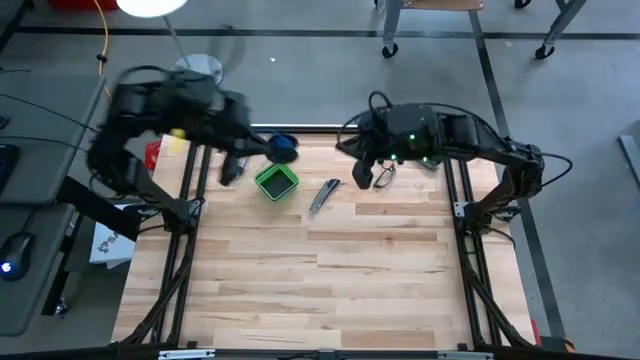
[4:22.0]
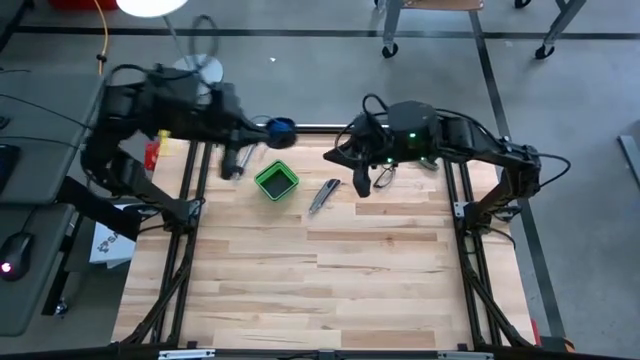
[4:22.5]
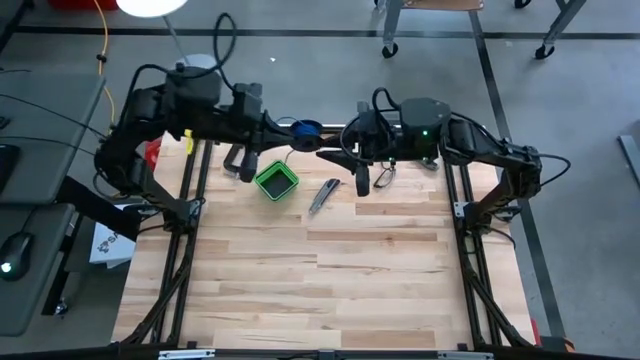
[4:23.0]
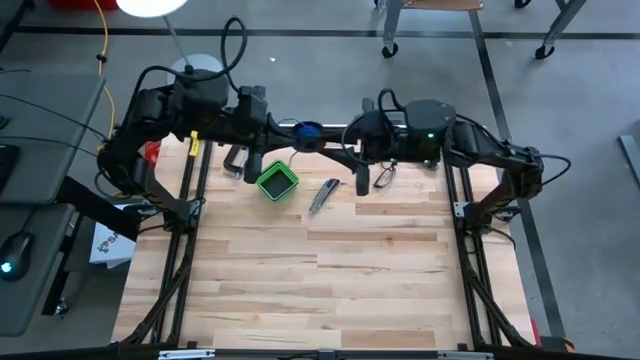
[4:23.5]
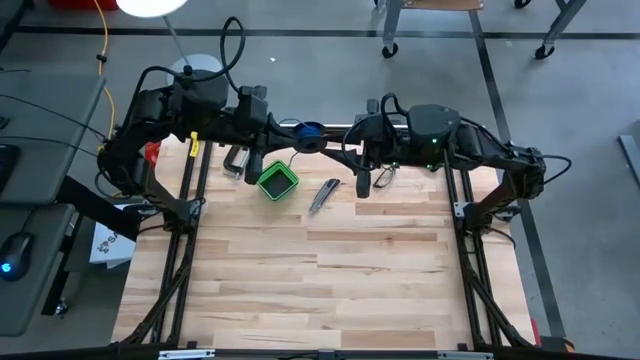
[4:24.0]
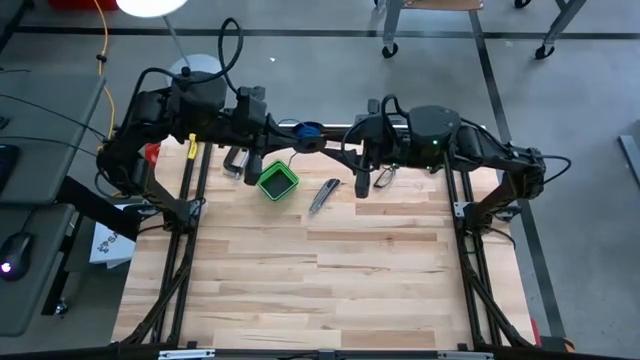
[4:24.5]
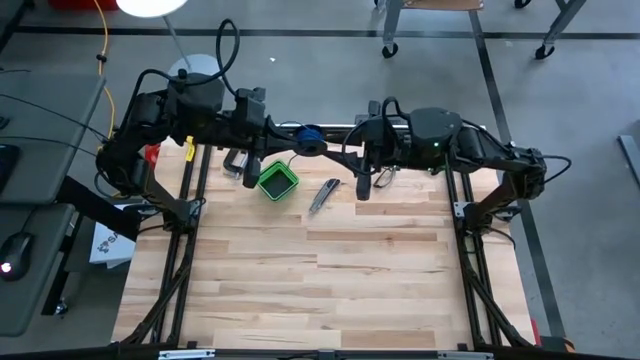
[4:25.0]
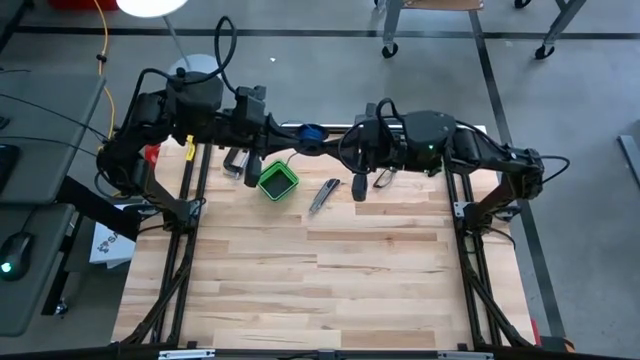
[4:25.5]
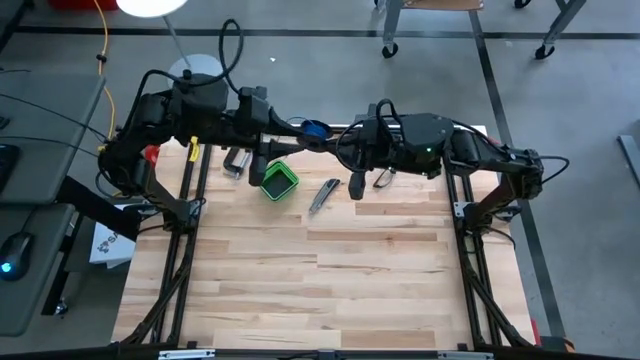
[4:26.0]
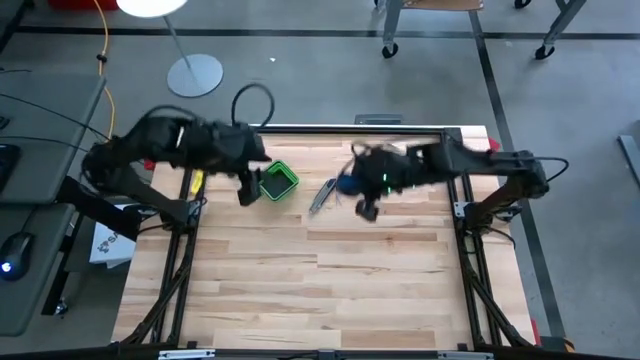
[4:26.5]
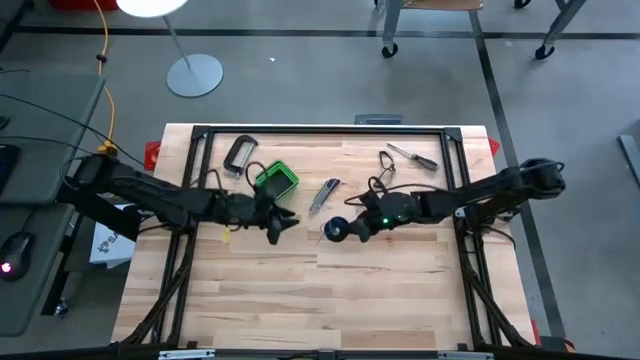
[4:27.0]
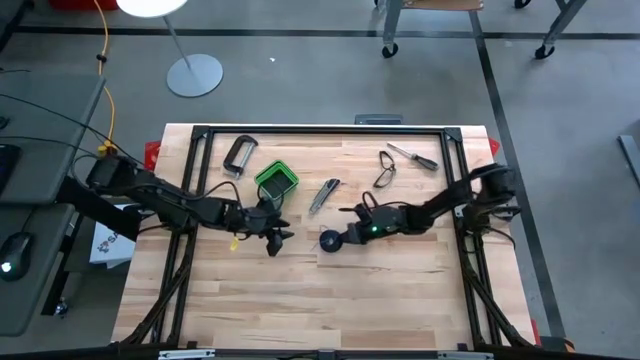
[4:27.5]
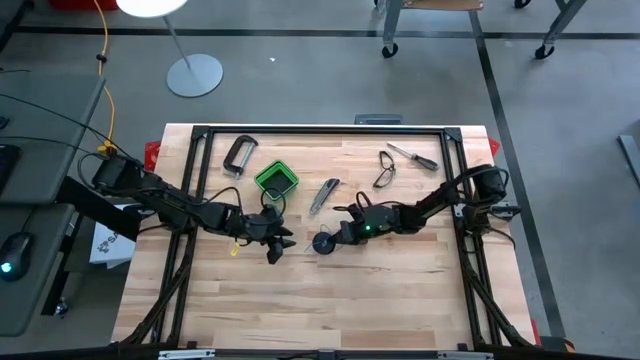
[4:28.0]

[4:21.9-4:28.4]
Task: Coil cords
Coil the blue wire onto the spool

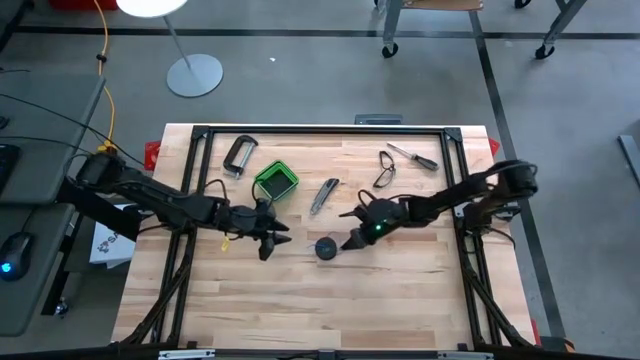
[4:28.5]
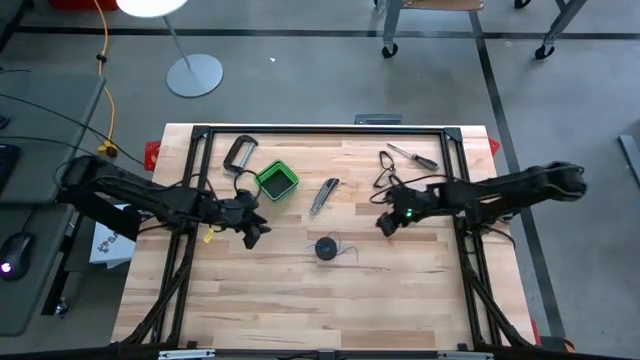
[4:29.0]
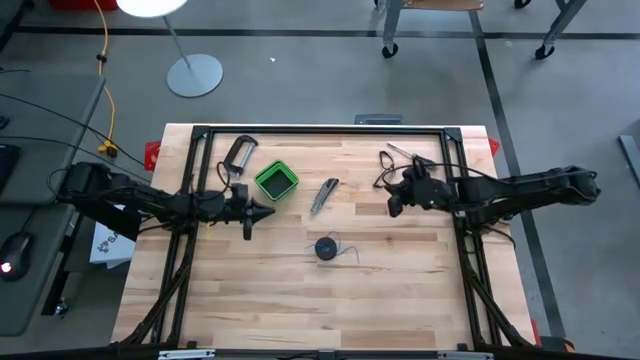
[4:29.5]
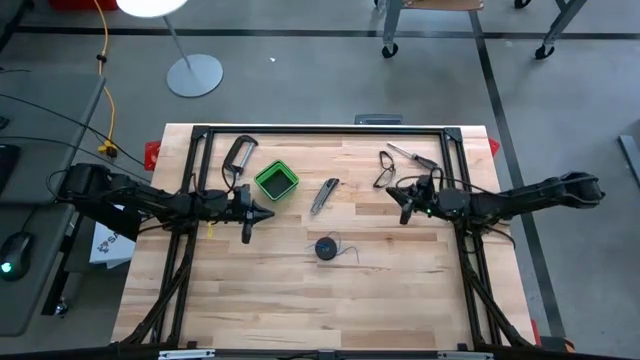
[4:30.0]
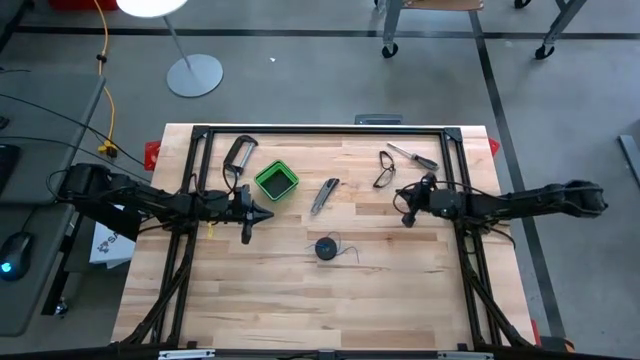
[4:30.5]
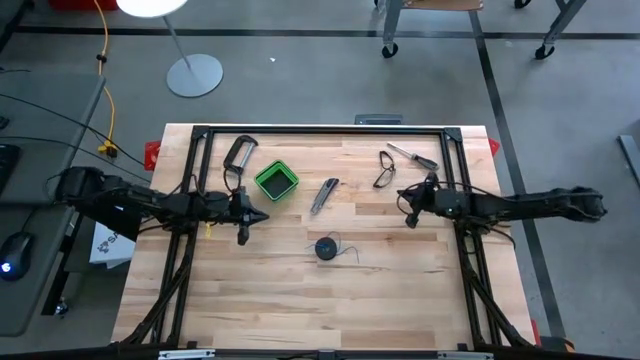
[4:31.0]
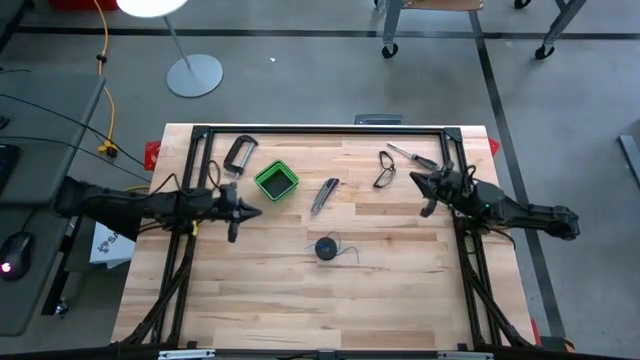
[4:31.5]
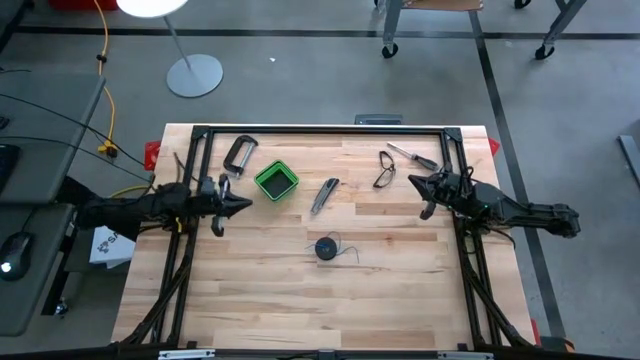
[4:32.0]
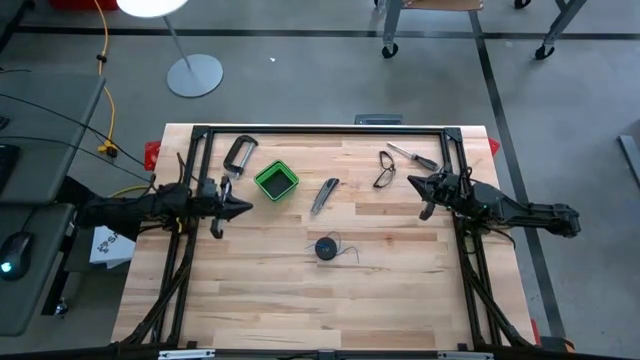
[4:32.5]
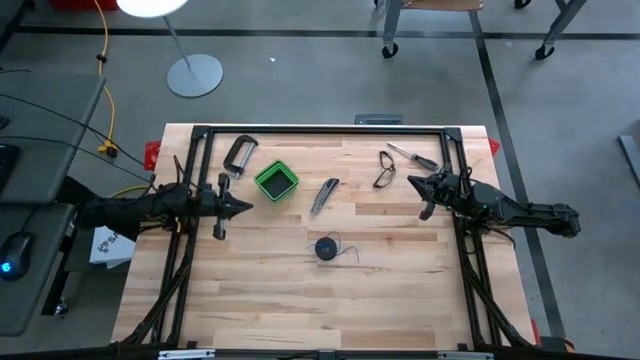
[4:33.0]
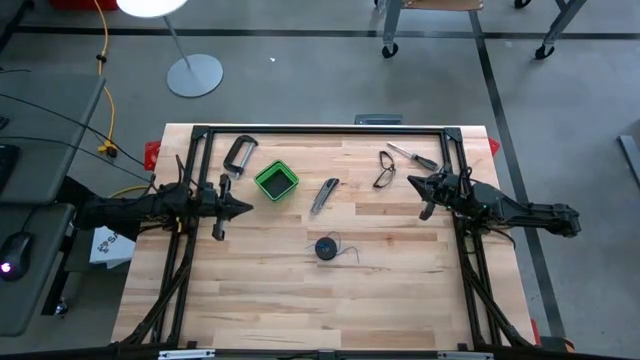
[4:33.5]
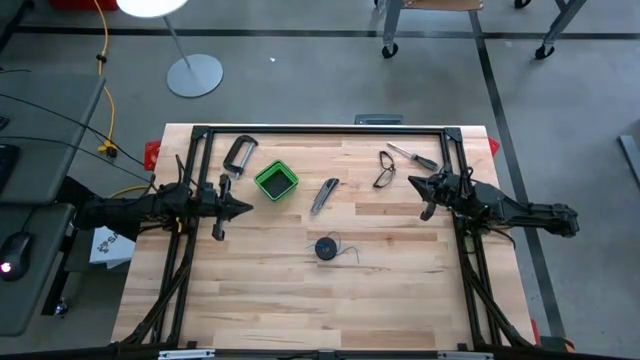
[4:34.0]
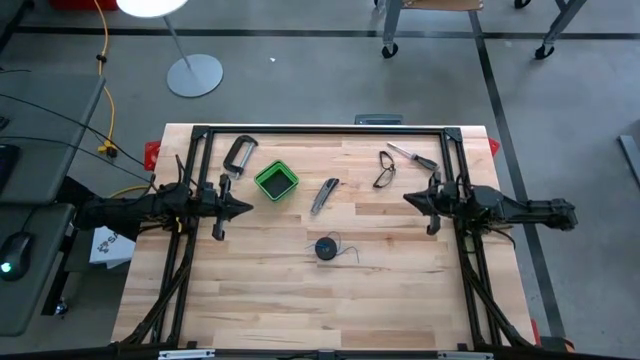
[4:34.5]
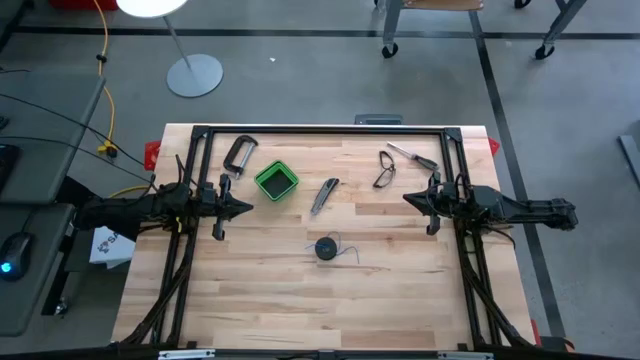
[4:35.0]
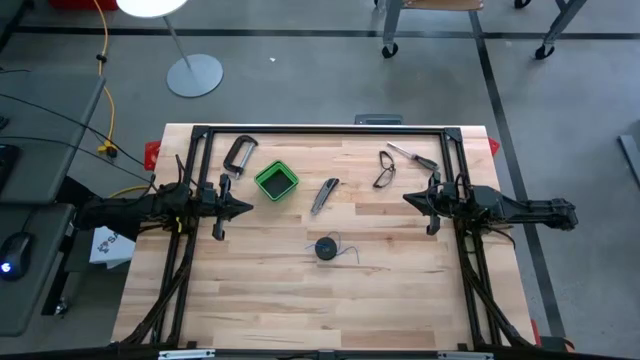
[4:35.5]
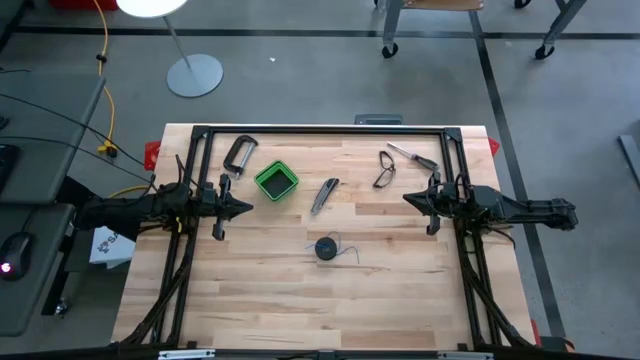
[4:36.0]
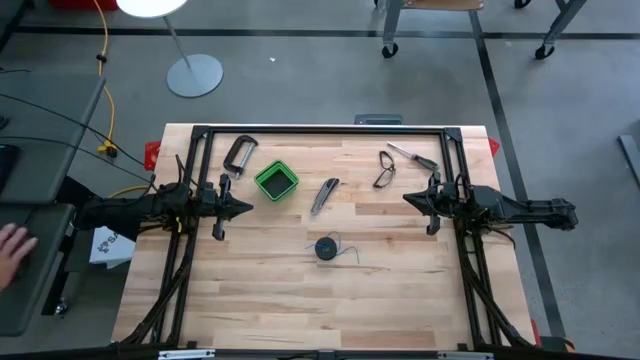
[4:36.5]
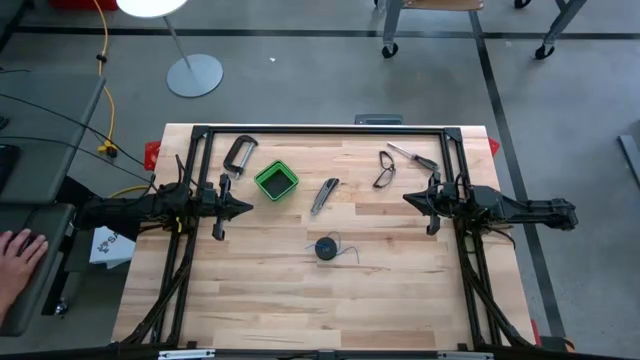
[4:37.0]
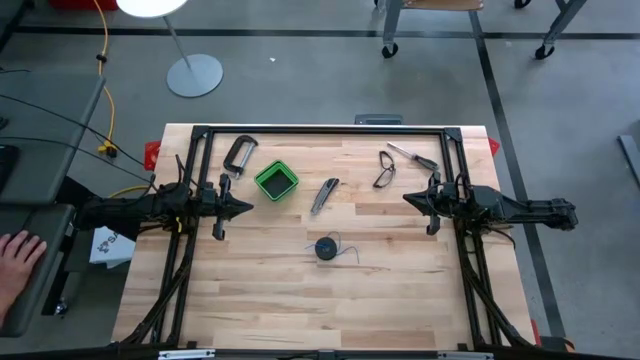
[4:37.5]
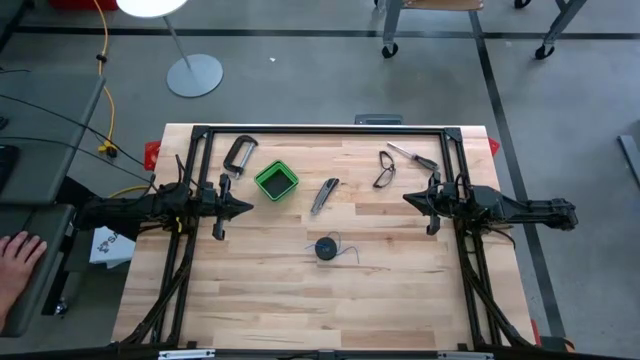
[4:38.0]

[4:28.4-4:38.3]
Return to Home Position

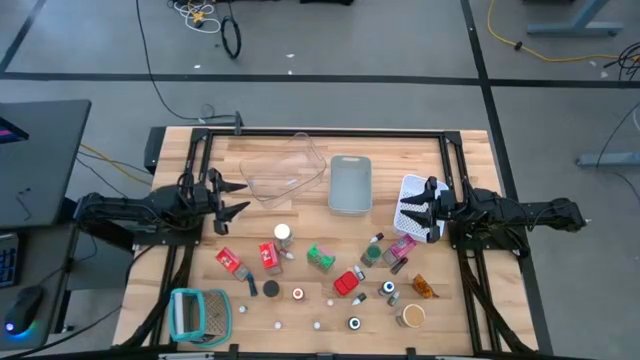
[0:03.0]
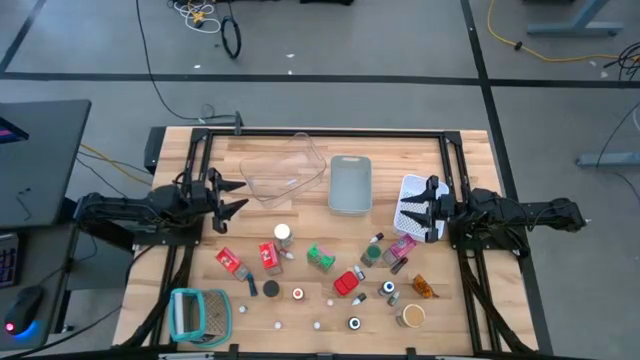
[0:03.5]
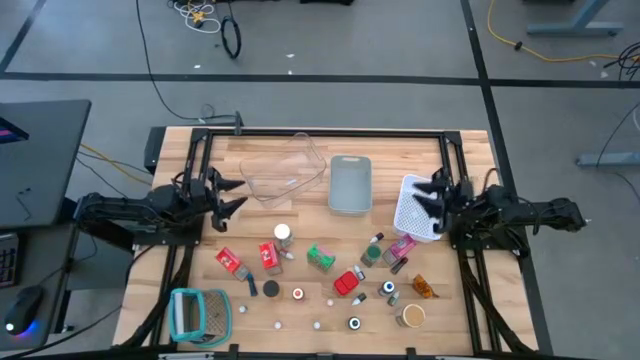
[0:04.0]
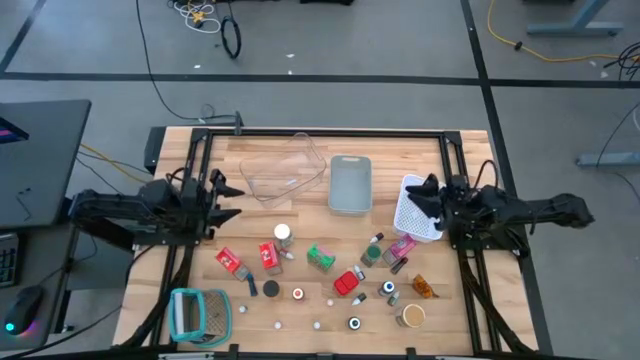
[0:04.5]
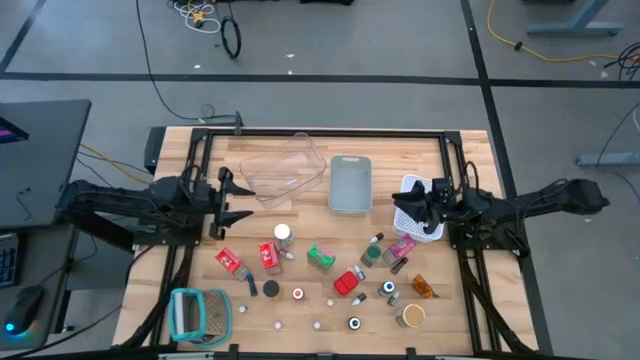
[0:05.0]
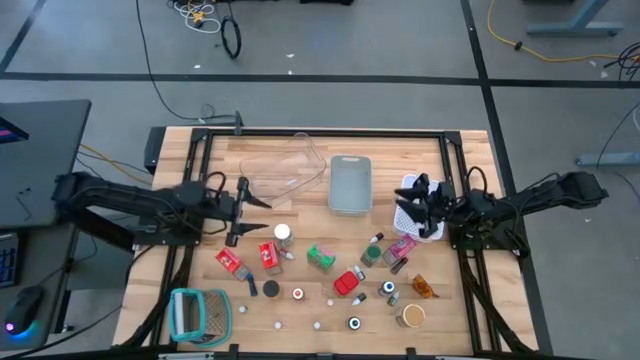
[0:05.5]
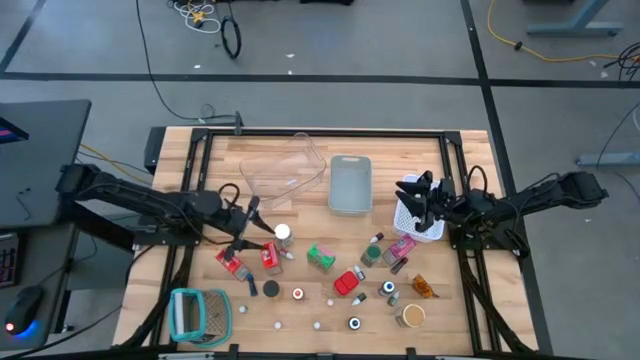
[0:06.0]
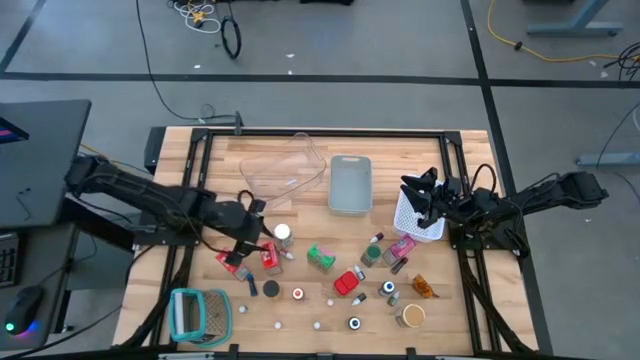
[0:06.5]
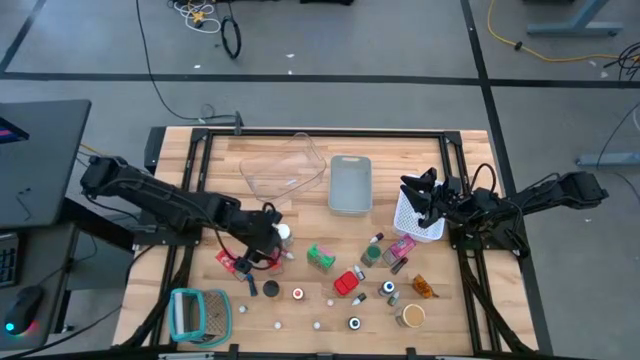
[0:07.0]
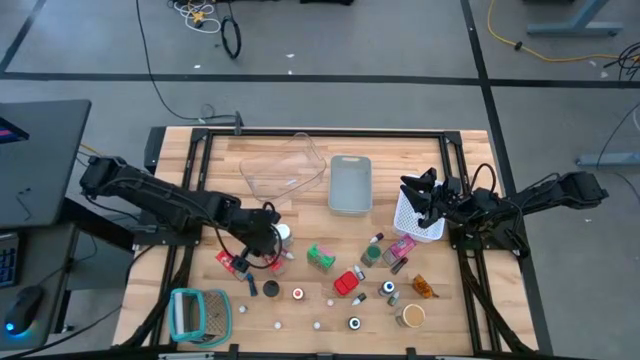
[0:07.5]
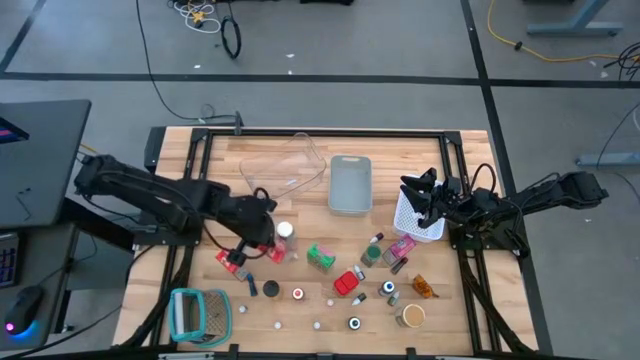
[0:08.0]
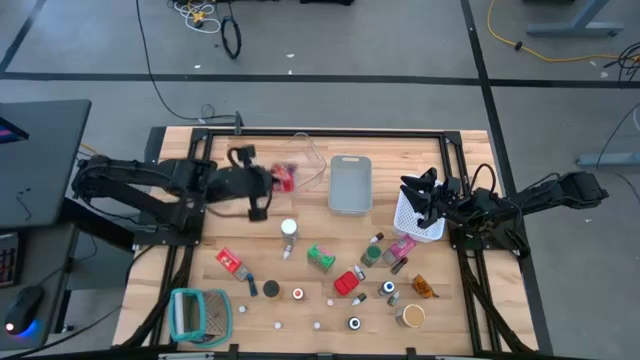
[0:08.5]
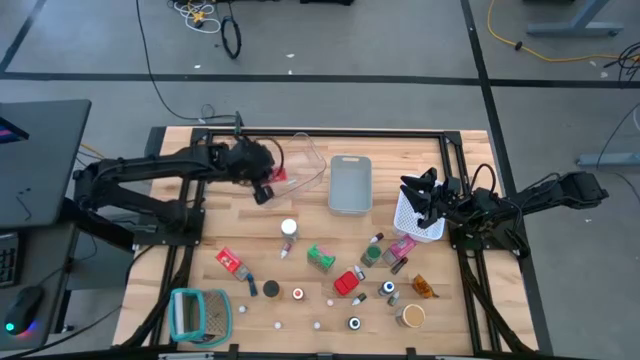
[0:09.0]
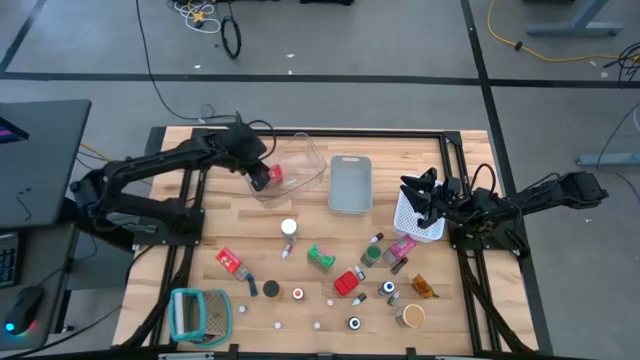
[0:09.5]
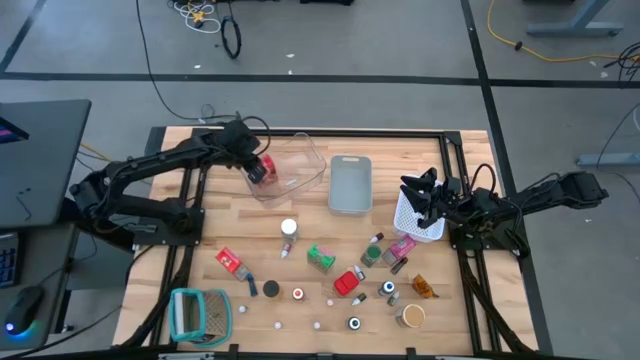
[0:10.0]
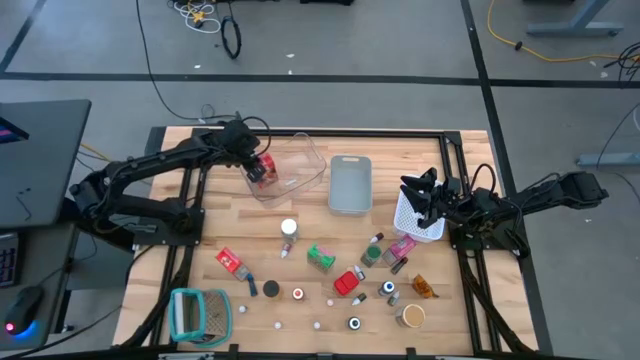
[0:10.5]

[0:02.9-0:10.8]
Task: Pick & Place Kitchen Items
Put the right red cereal box into the transparent bin
